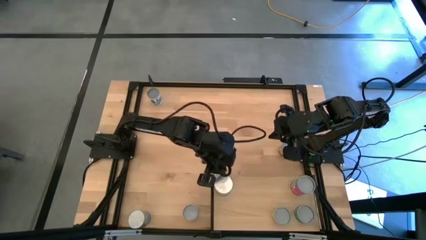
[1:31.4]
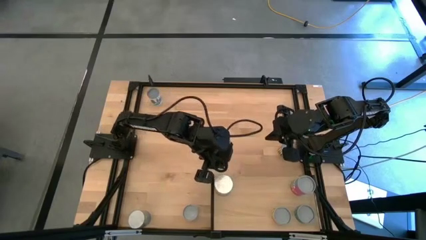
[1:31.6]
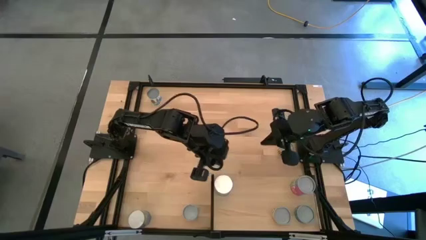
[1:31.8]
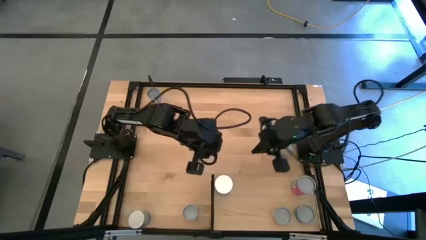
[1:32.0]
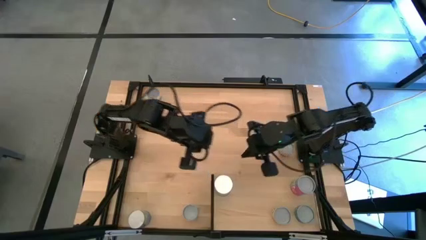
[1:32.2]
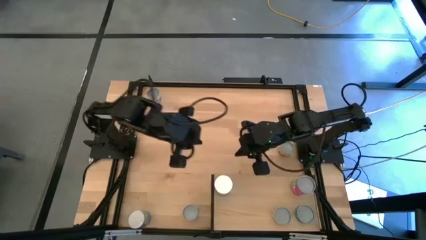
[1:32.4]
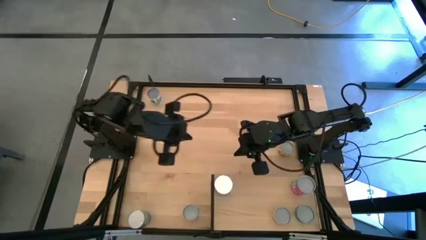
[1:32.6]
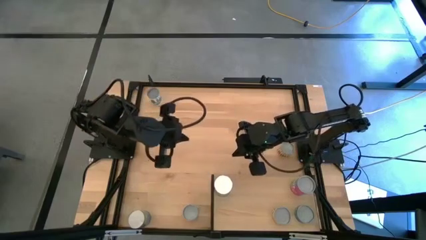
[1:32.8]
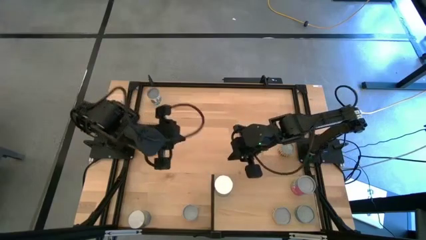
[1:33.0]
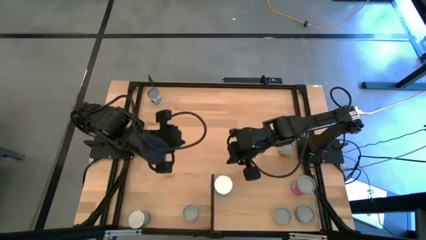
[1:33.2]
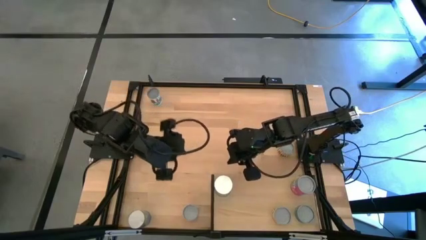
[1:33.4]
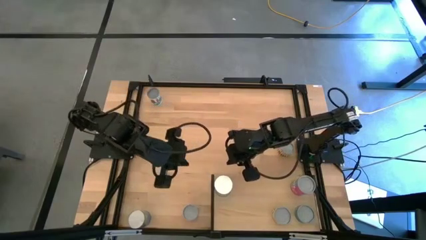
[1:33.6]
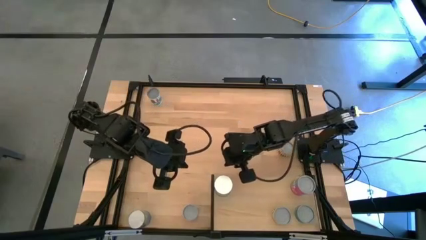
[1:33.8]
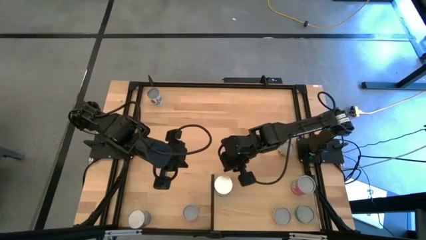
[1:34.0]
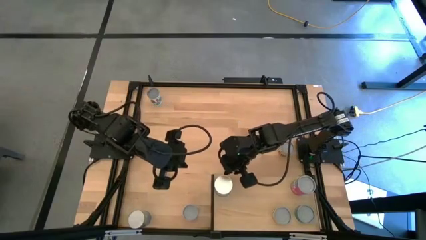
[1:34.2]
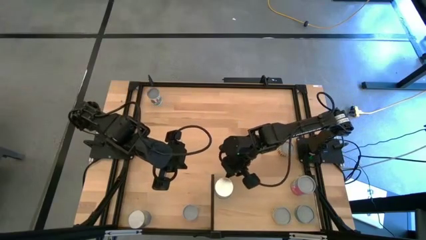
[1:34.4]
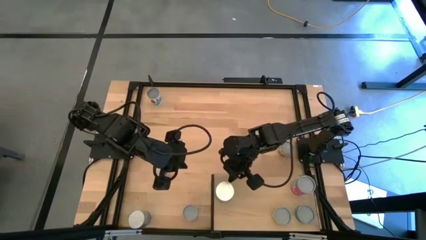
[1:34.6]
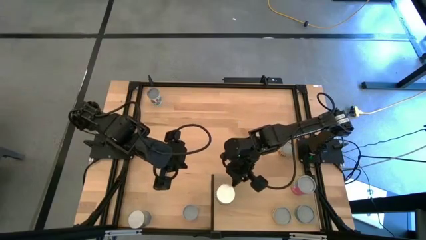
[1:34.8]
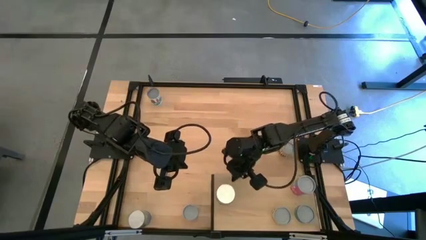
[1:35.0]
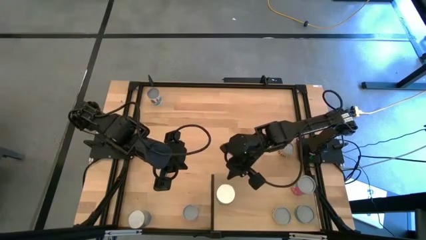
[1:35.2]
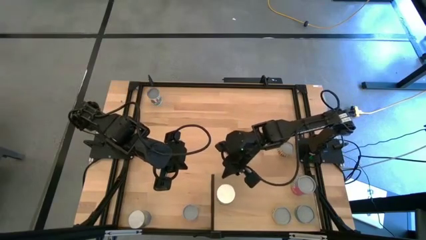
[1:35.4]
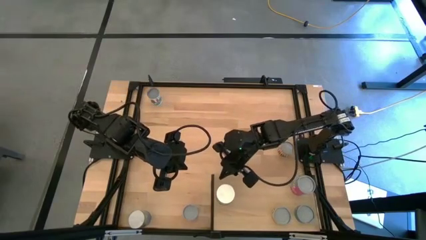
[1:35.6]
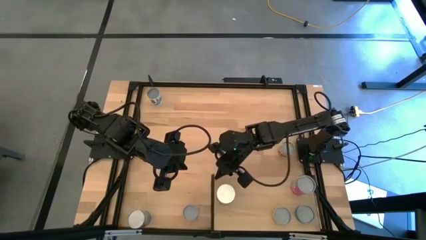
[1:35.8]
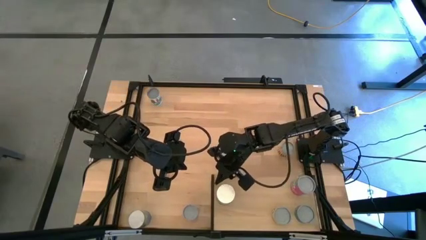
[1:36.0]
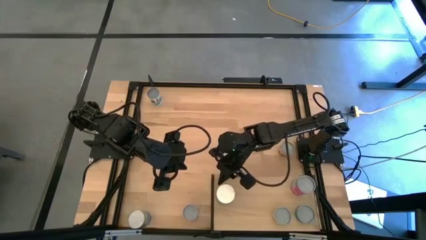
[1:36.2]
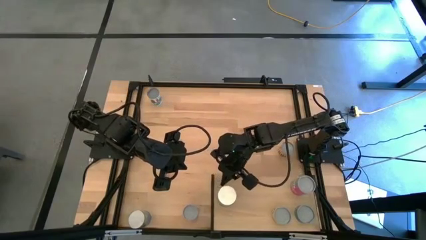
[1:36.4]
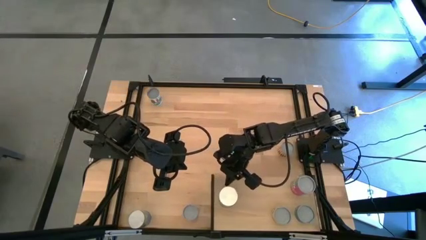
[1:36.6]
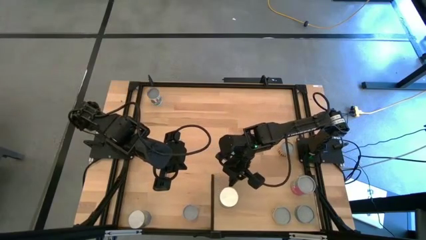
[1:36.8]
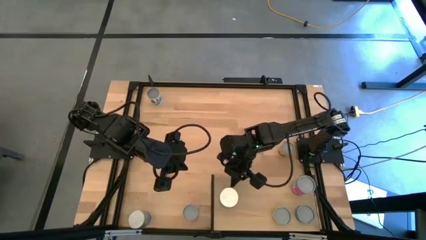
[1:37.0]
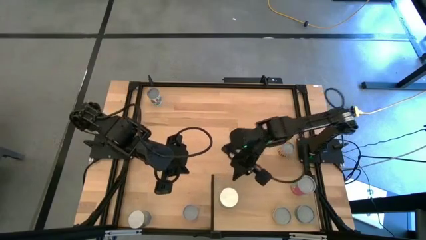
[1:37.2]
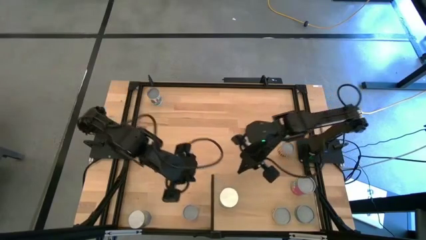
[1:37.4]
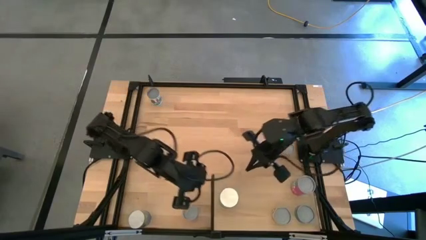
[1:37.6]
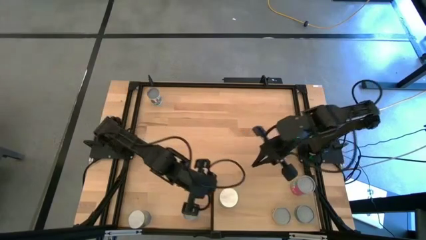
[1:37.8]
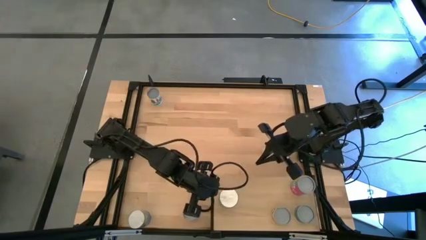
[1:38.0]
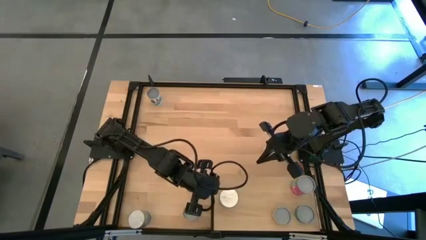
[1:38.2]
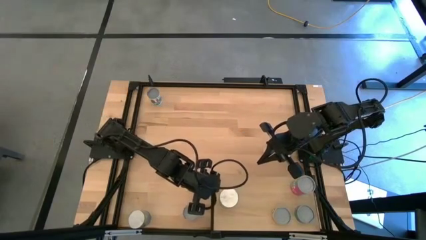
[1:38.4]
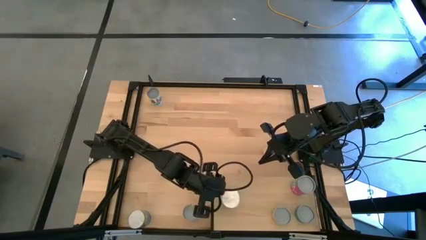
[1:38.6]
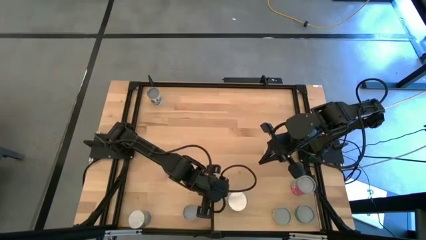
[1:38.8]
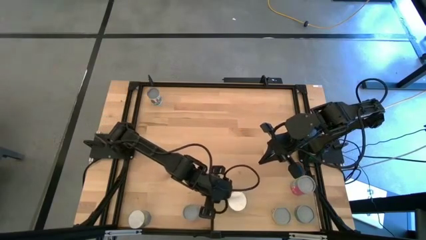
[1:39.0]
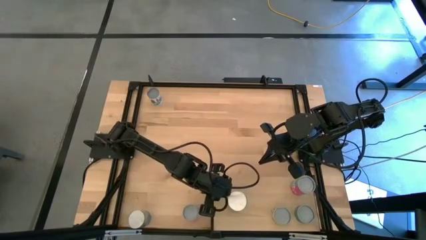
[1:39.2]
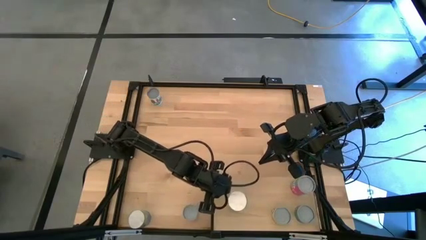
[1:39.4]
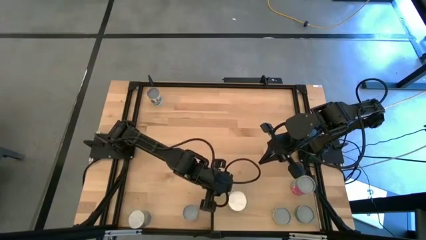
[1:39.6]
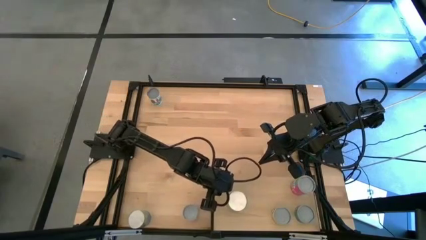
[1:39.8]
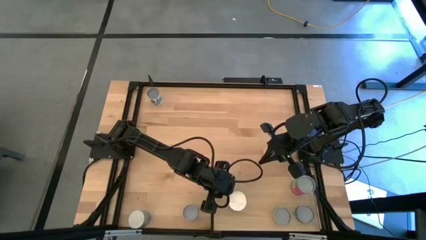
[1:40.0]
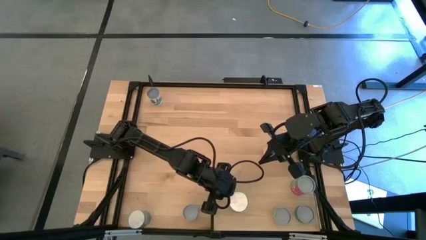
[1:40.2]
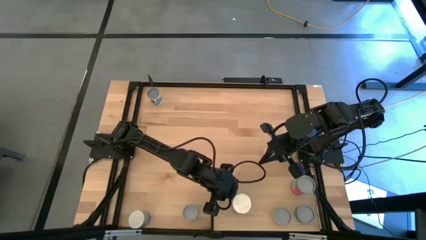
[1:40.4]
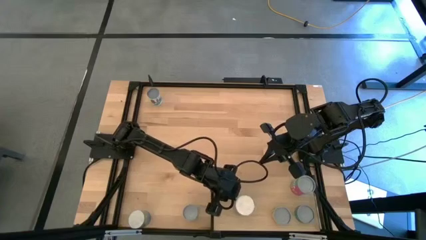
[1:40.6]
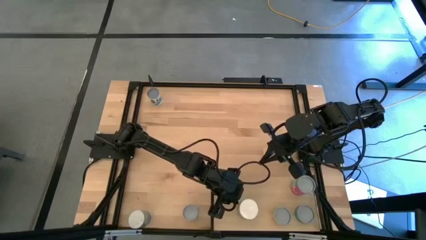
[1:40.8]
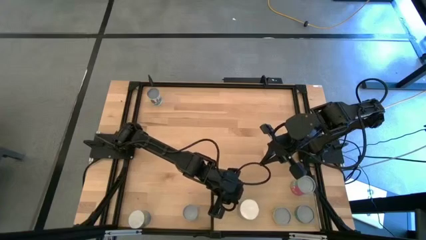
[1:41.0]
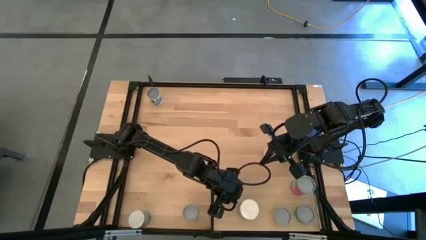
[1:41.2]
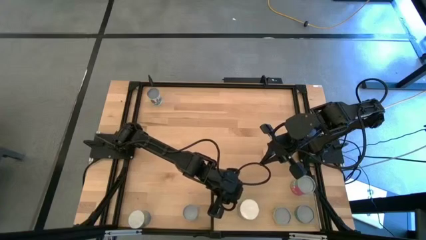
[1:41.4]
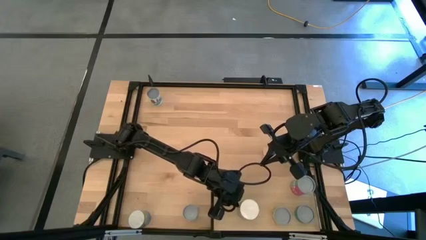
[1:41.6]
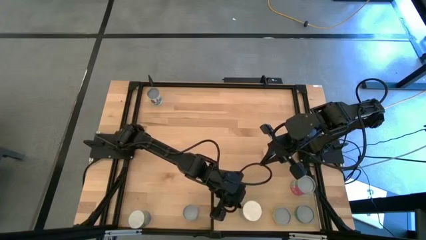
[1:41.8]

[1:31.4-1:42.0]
Task: Pick and place cans onto a shelf
Put the top canned cherries on the shelf
